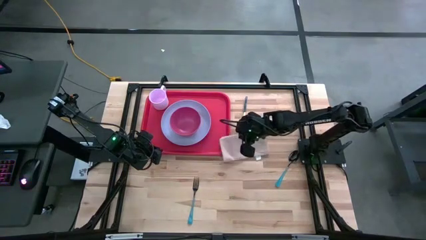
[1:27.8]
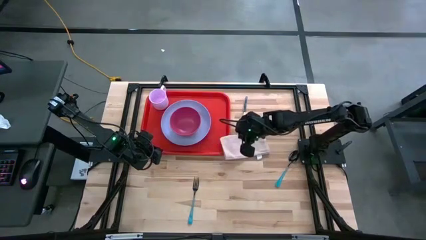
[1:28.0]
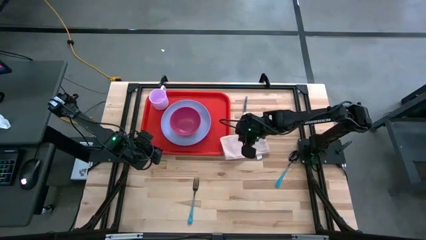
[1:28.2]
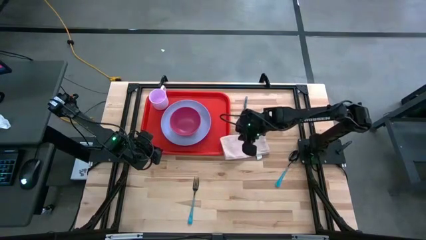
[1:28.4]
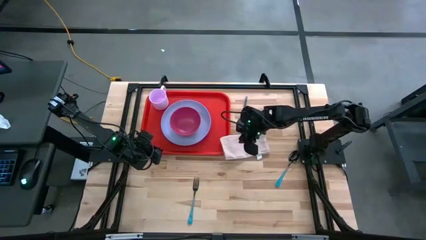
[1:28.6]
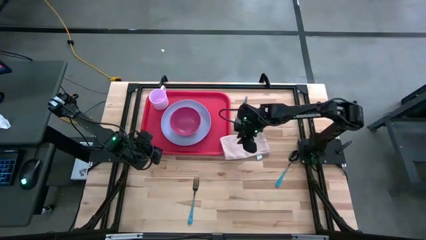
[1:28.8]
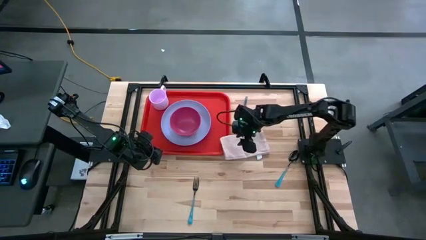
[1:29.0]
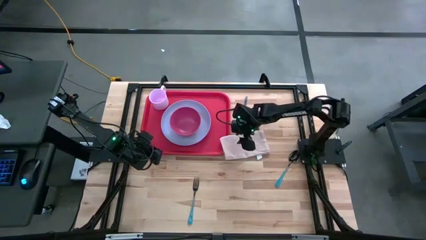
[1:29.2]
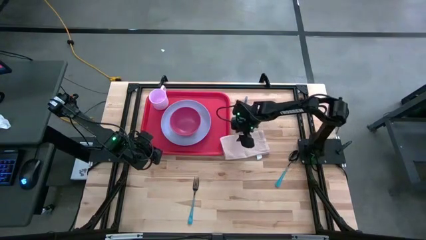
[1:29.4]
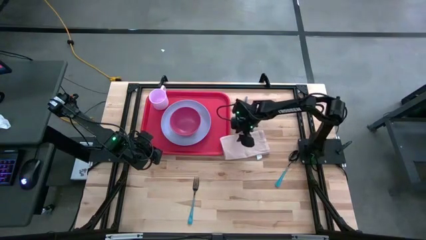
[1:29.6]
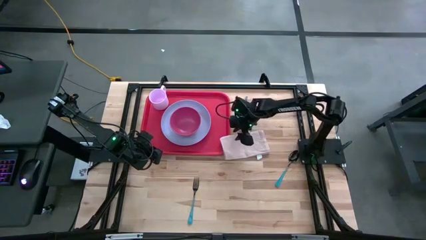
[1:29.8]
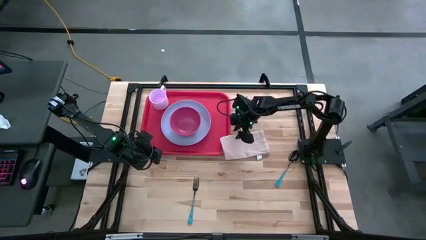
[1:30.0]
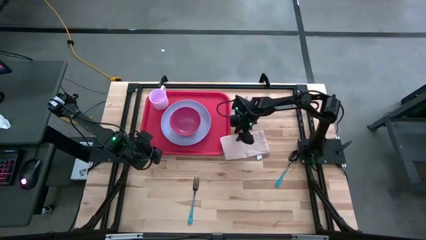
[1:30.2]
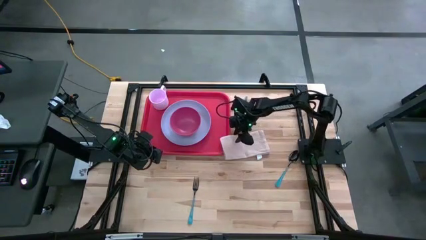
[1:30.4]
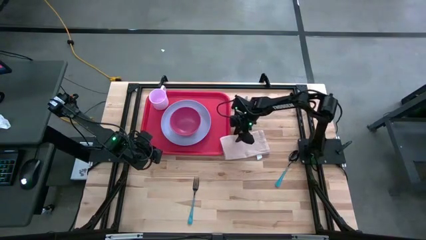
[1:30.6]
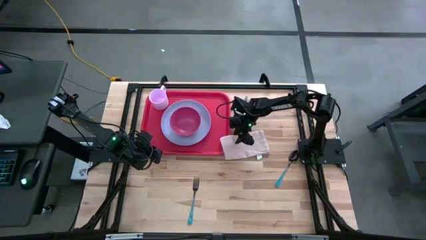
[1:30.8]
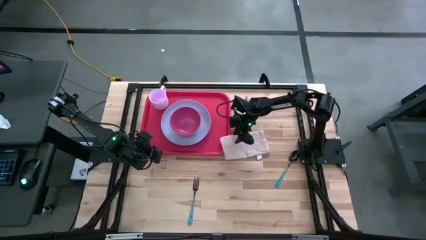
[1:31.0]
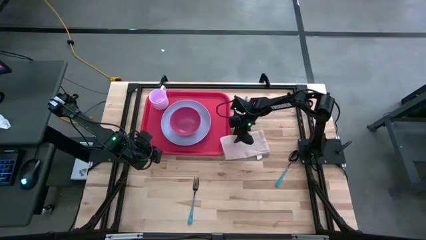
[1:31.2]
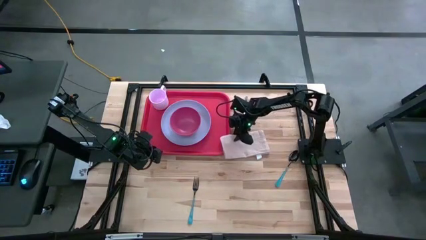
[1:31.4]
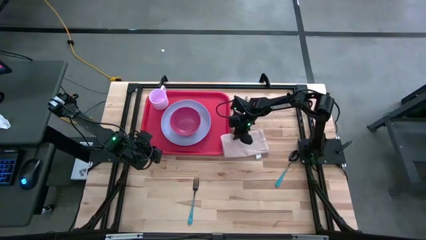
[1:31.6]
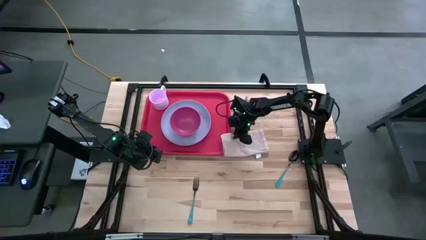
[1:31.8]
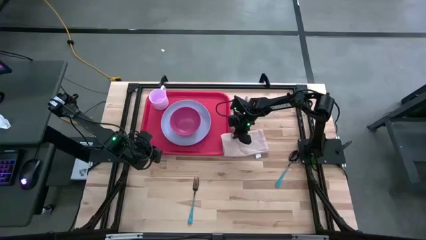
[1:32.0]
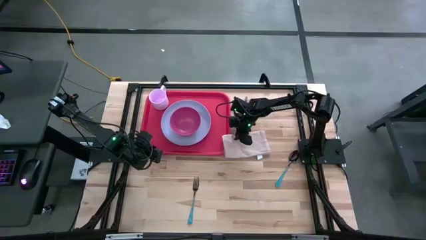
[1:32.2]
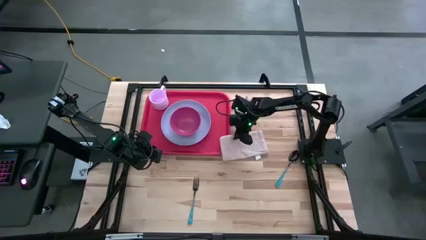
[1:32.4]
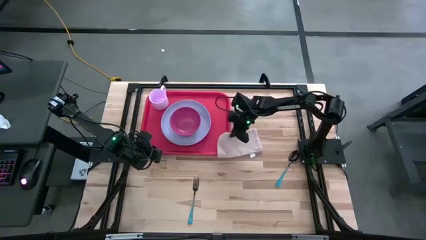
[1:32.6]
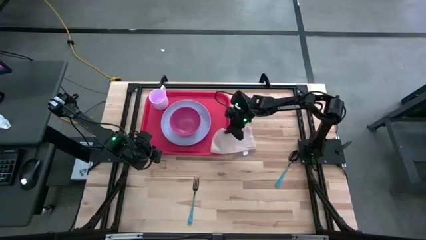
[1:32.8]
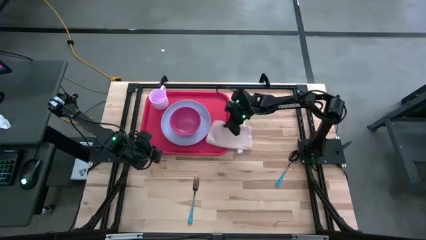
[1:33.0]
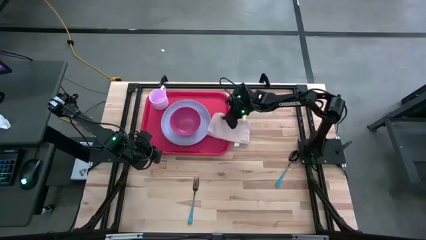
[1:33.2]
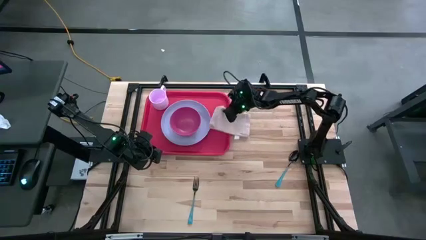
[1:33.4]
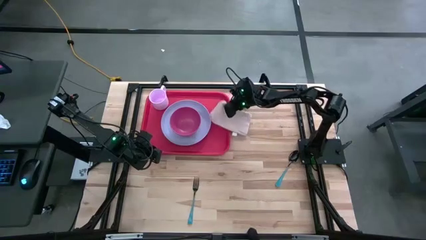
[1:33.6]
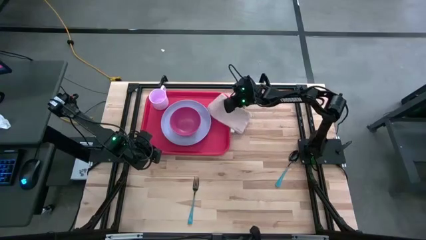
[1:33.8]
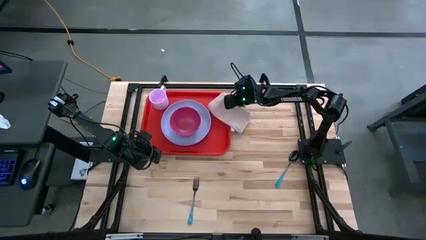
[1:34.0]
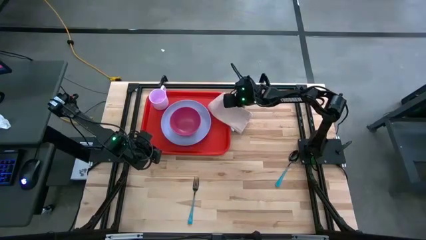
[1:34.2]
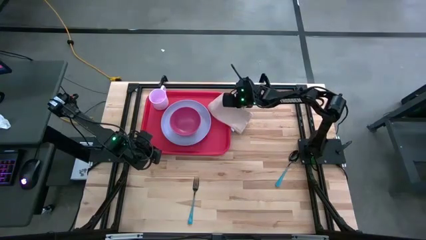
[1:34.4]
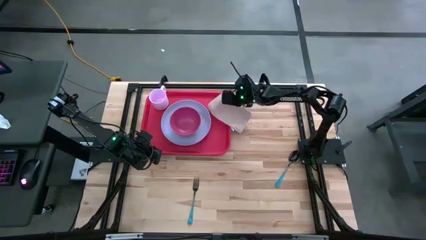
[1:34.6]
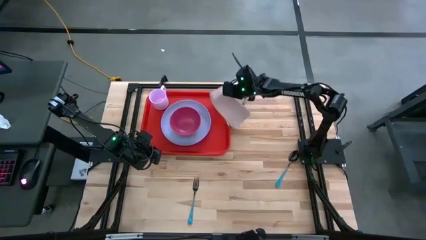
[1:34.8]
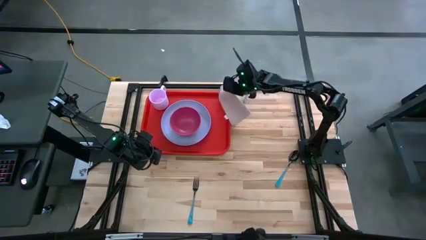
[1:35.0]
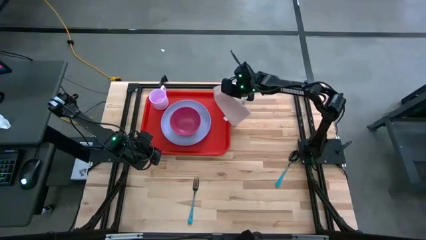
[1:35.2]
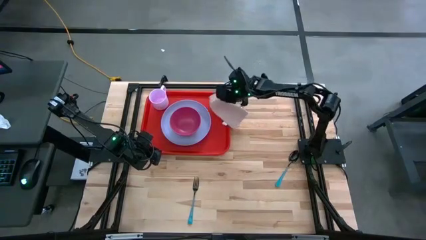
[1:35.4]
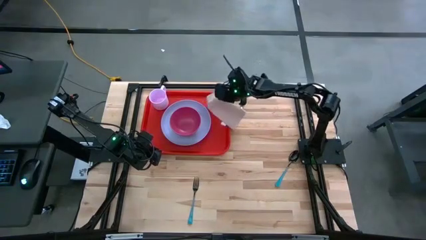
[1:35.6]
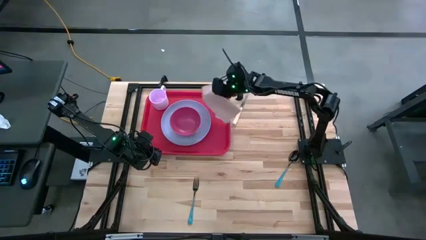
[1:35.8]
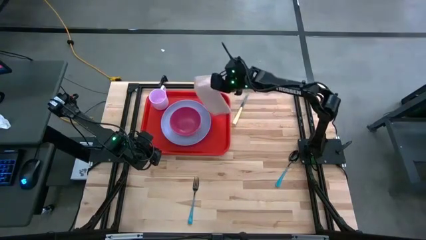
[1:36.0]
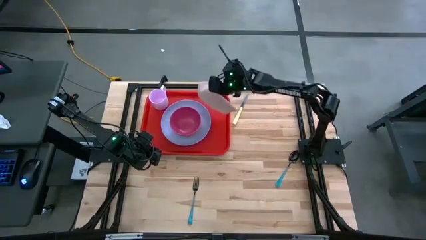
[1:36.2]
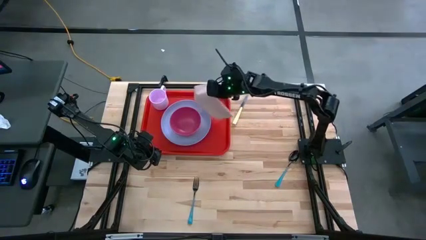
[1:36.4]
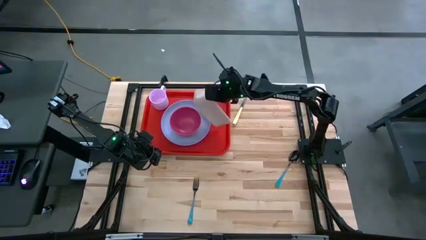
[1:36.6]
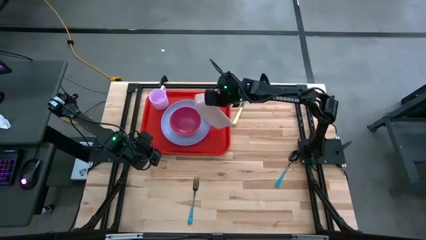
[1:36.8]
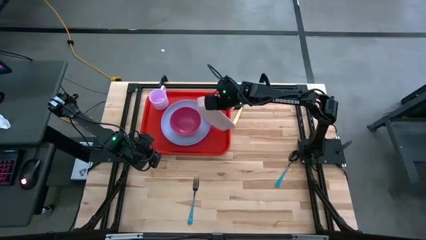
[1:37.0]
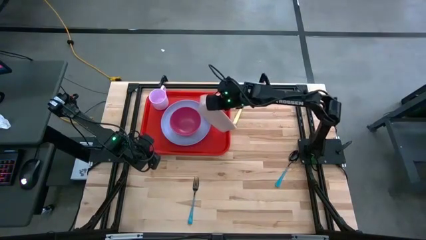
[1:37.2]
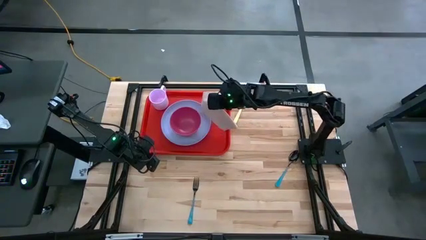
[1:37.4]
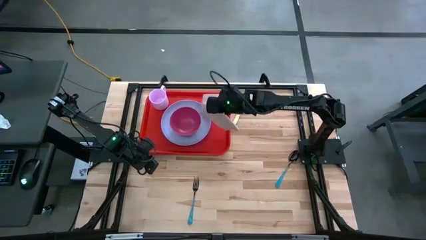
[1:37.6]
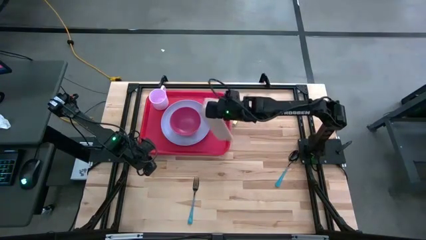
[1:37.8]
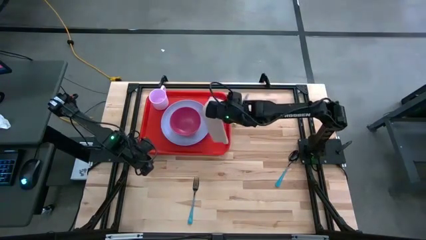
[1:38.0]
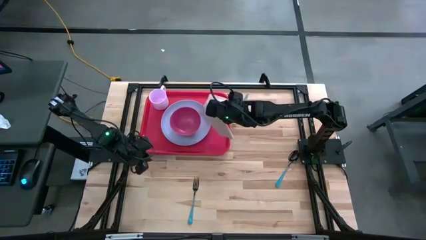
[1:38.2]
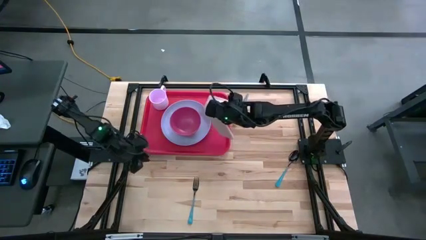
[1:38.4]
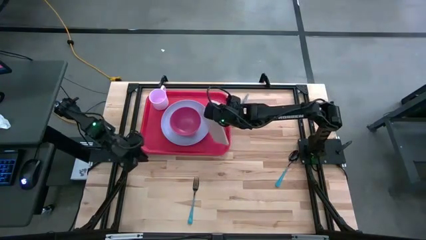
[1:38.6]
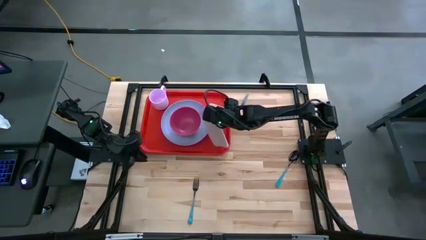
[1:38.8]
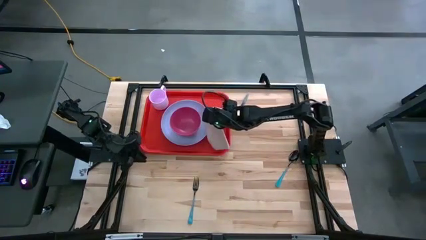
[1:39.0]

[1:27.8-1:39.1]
Task: Set up tray
Put the brown napkin on the red tray to the right of the purple plate

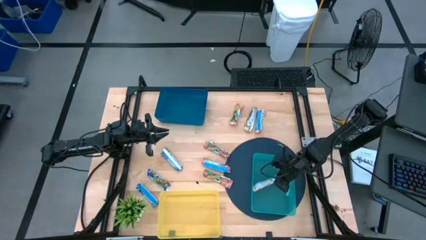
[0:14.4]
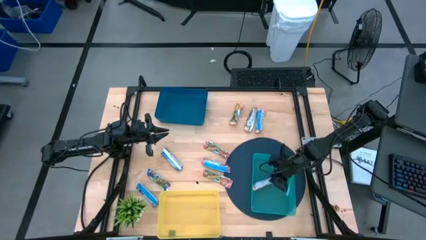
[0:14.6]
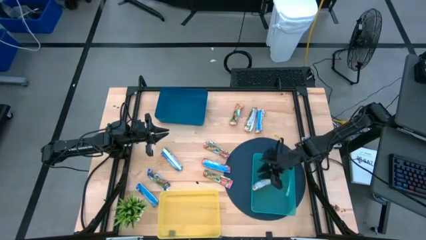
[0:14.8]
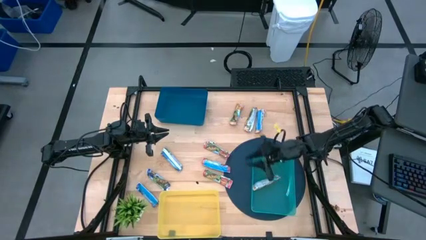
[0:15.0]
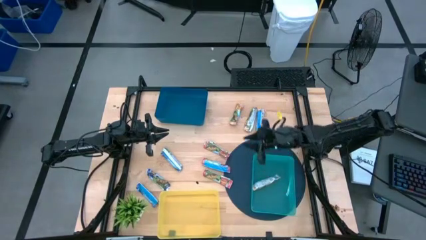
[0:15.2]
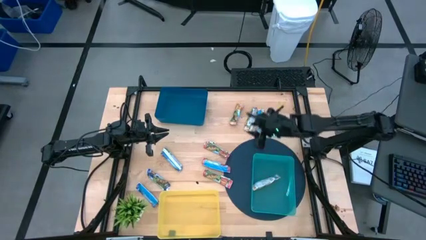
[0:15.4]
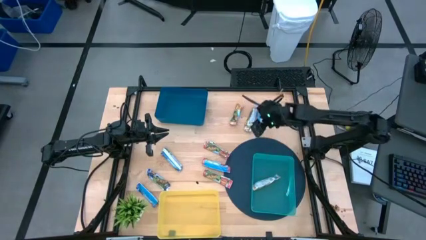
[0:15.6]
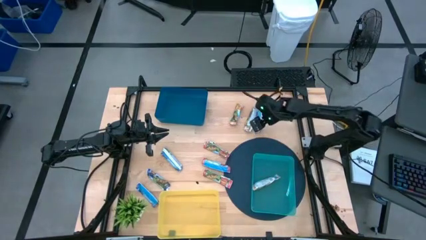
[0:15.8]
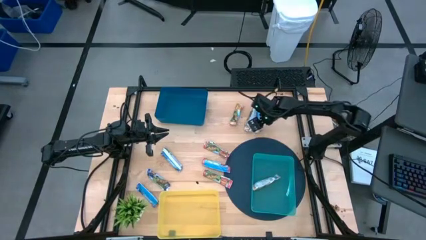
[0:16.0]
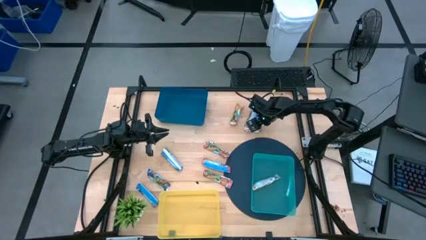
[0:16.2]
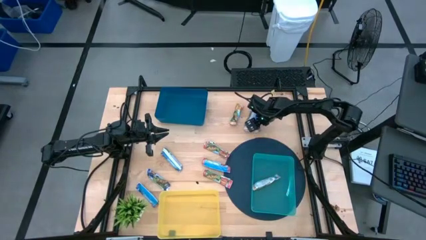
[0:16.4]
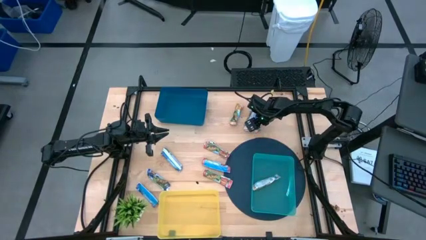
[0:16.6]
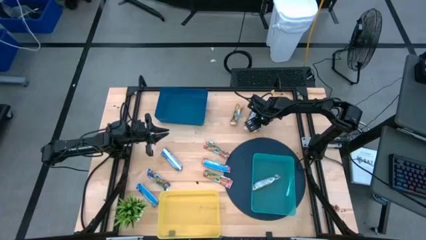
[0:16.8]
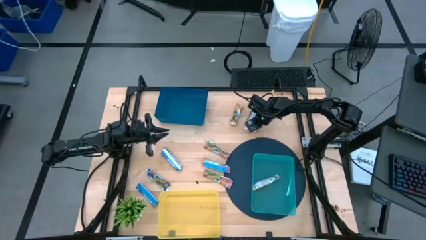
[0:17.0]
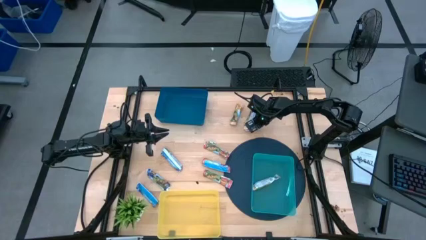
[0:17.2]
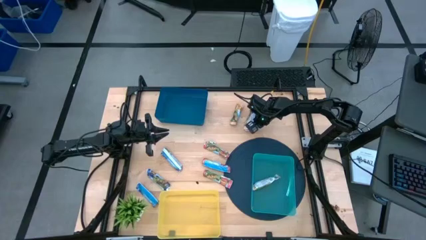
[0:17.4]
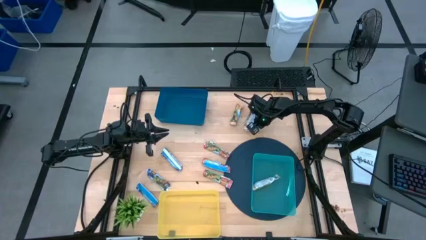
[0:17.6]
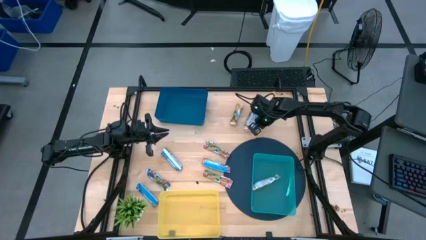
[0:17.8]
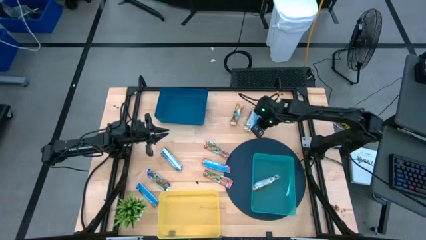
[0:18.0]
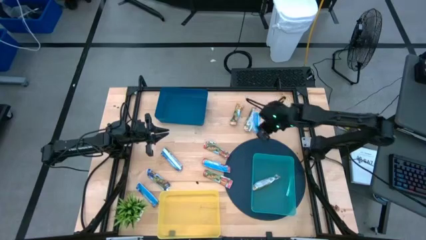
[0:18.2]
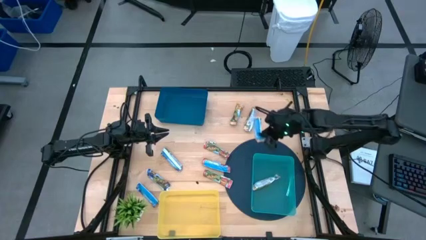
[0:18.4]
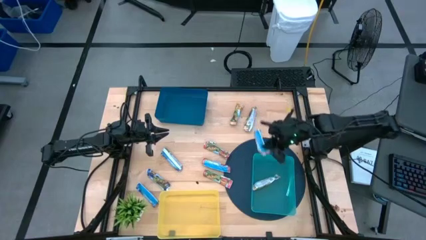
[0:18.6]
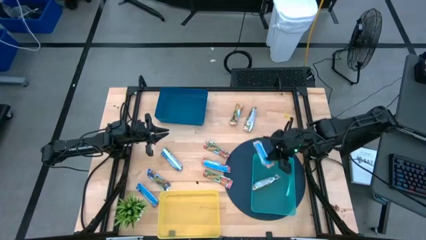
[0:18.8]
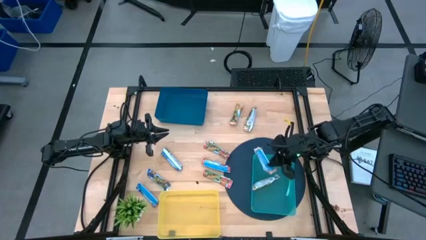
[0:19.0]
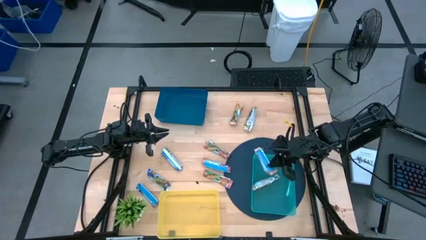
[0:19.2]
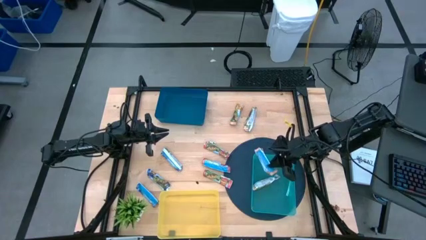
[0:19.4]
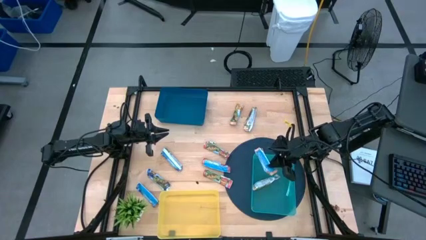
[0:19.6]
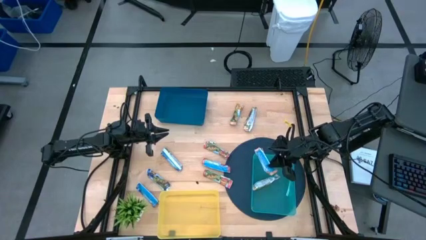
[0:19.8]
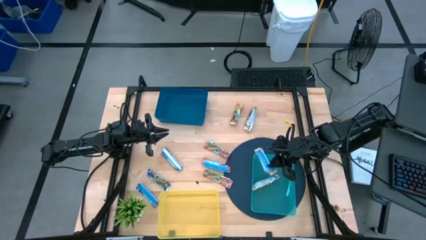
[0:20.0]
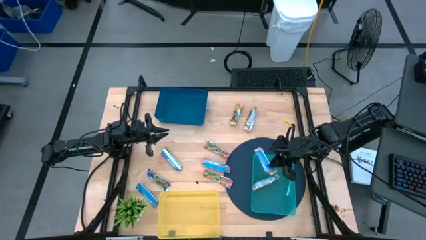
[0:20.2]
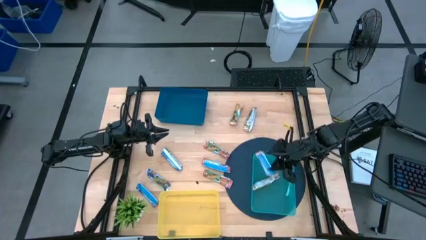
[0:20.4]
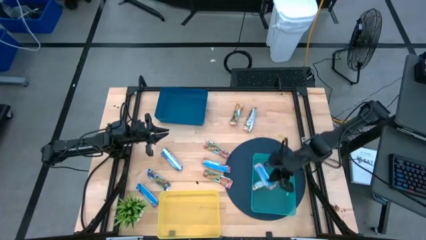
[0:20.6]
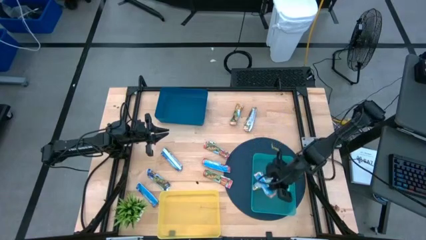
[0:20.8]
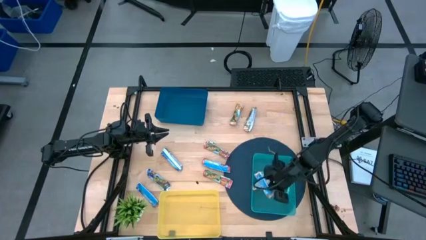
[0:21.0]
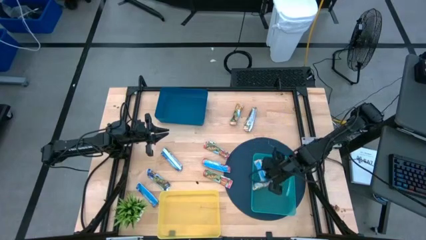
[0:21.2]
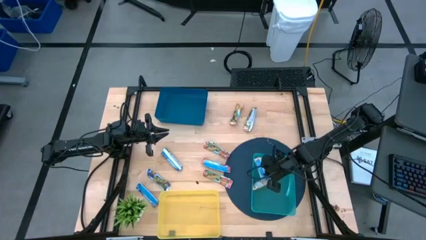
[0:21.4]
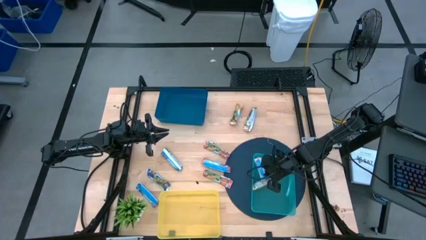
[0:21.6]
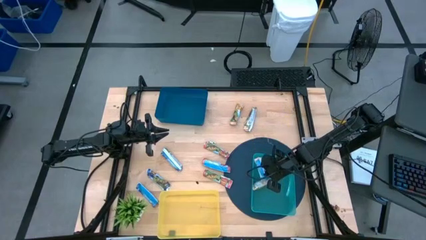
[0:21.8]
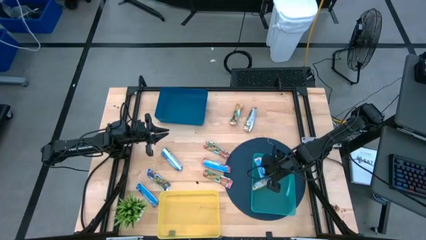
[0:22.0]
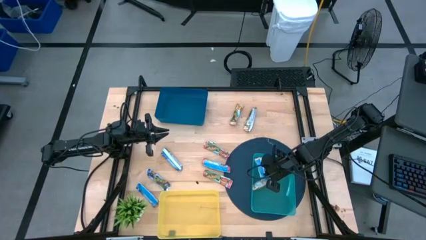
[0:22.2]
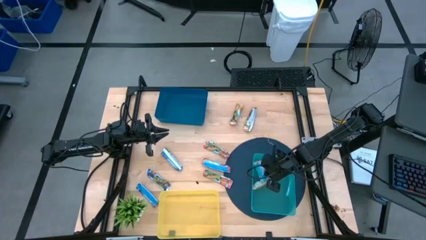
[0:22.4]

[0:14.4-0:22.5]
Task: Pick and place Granola Bars by type
Put the right yellow granola bar into the green bin
